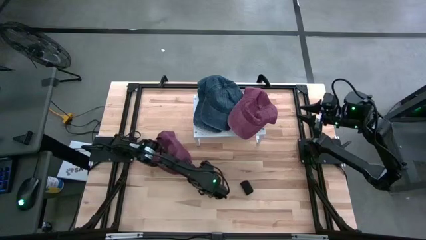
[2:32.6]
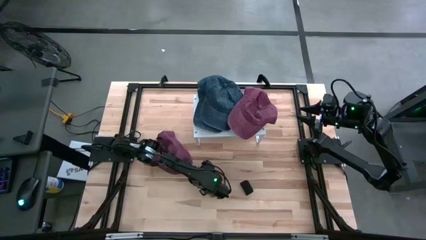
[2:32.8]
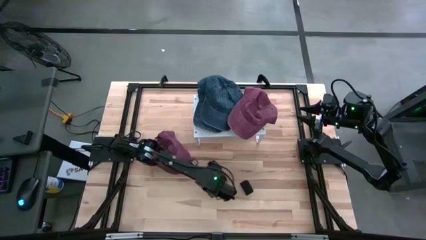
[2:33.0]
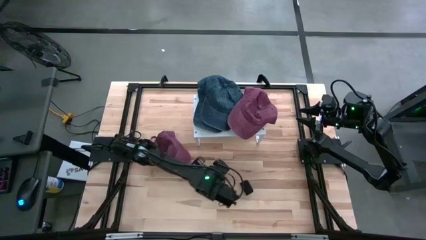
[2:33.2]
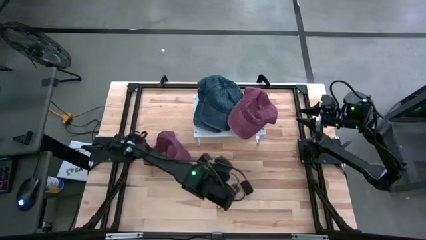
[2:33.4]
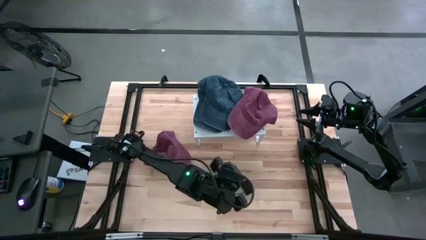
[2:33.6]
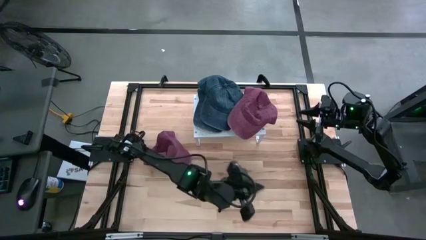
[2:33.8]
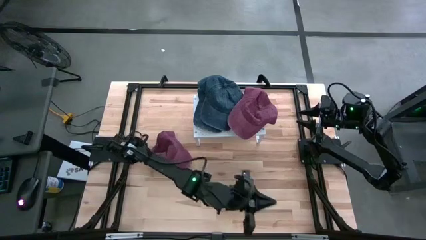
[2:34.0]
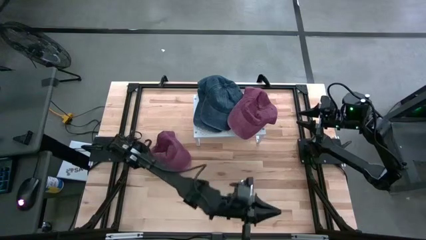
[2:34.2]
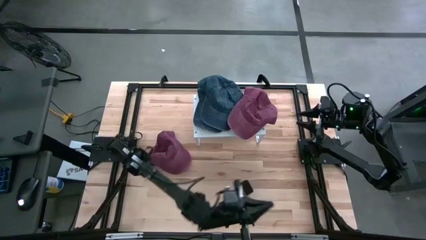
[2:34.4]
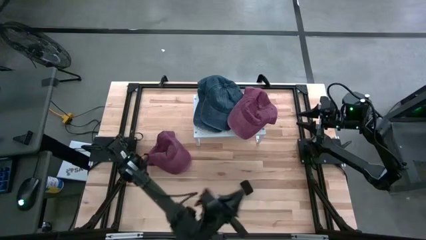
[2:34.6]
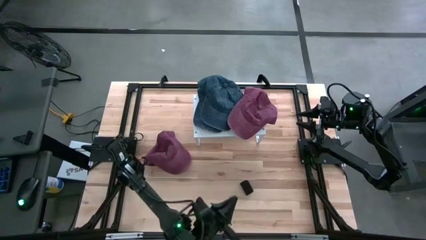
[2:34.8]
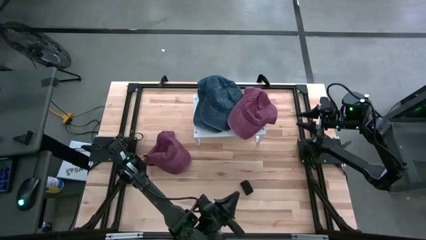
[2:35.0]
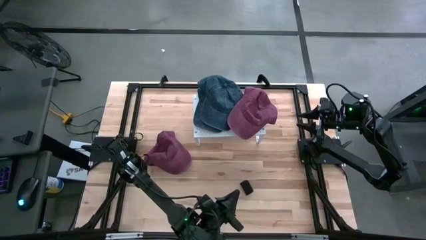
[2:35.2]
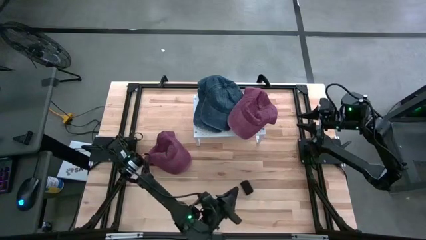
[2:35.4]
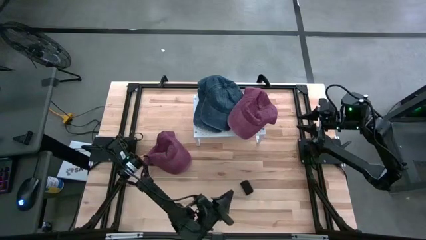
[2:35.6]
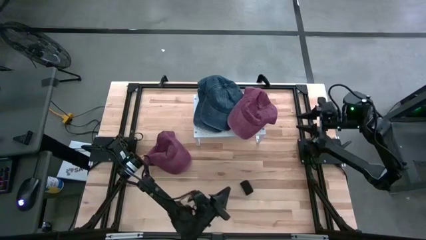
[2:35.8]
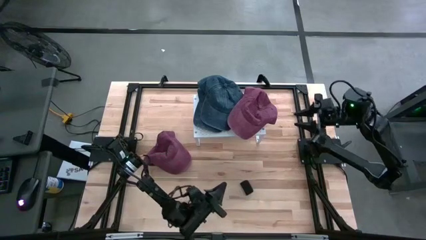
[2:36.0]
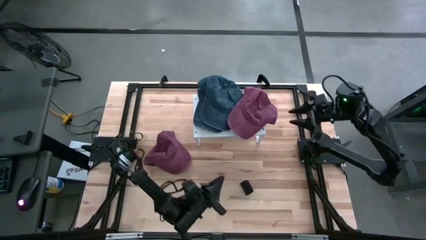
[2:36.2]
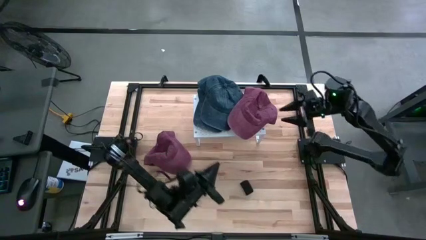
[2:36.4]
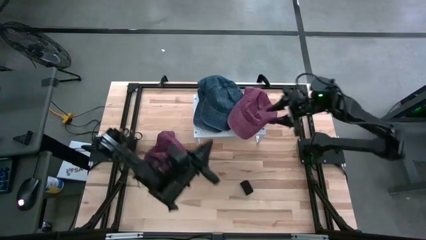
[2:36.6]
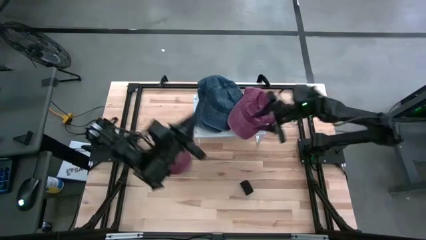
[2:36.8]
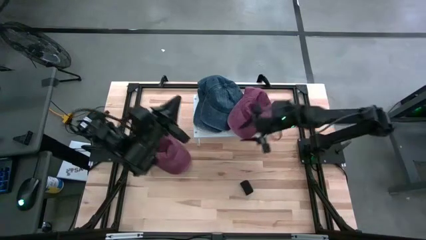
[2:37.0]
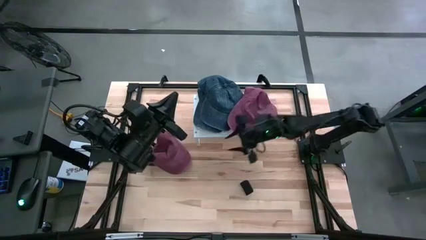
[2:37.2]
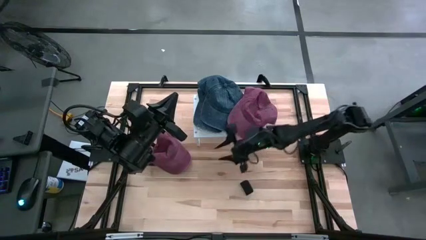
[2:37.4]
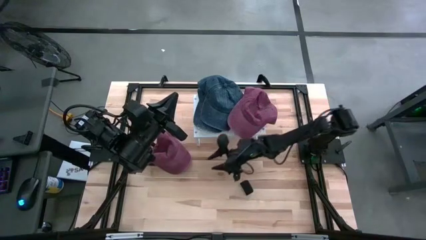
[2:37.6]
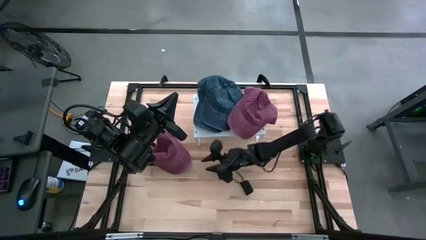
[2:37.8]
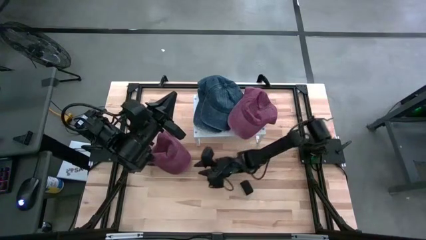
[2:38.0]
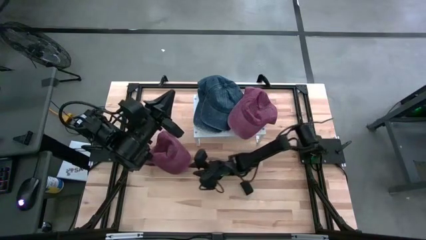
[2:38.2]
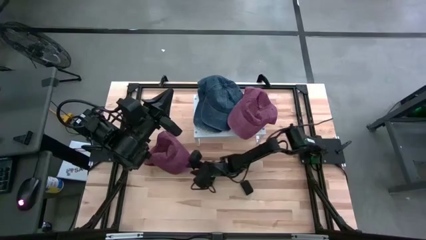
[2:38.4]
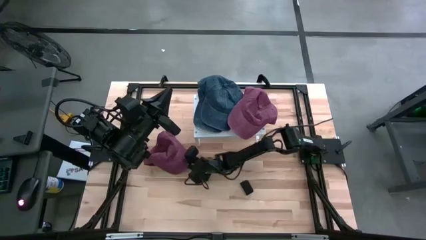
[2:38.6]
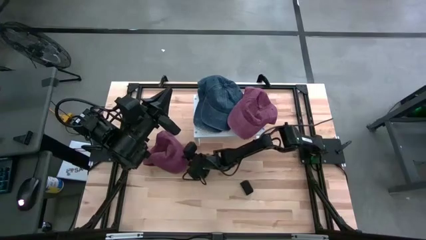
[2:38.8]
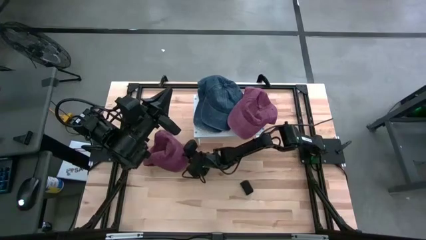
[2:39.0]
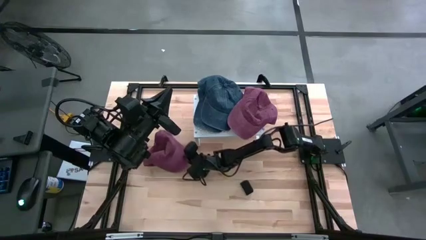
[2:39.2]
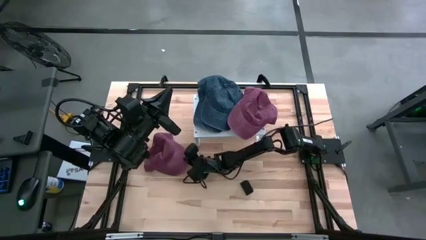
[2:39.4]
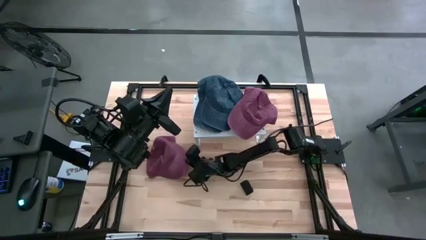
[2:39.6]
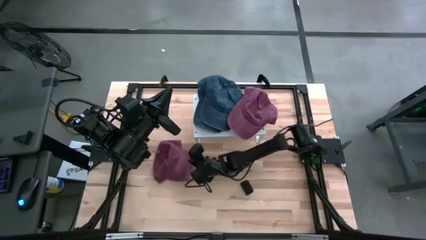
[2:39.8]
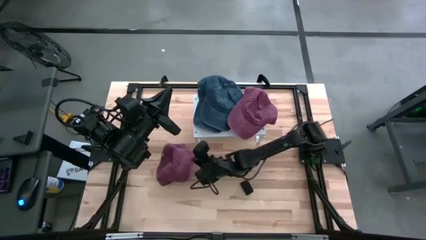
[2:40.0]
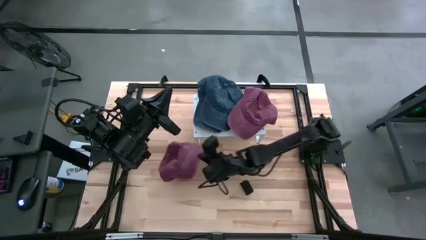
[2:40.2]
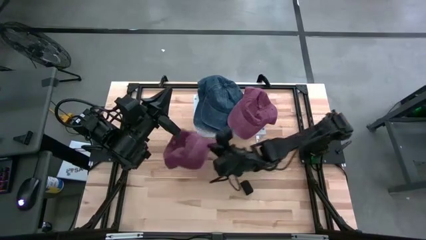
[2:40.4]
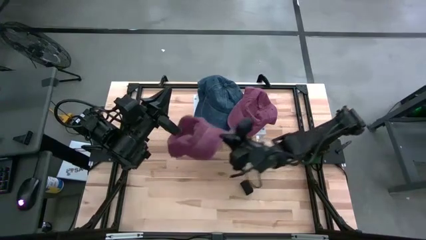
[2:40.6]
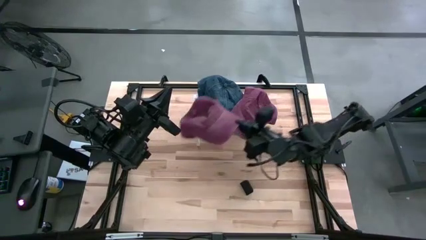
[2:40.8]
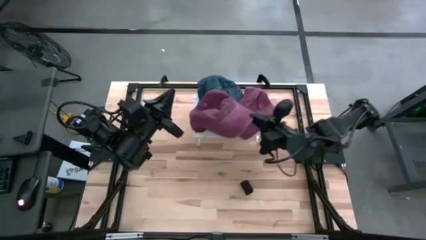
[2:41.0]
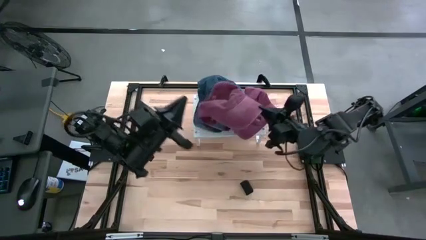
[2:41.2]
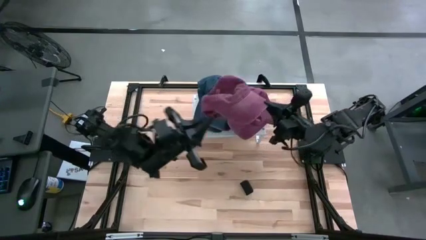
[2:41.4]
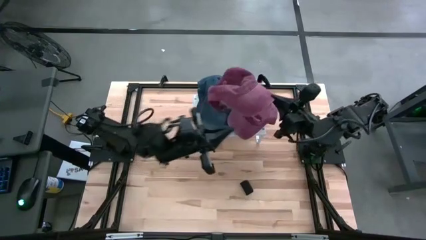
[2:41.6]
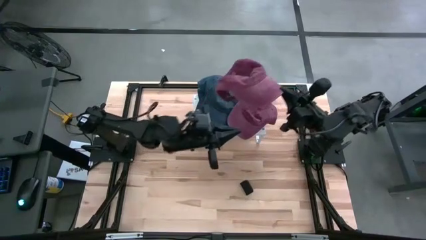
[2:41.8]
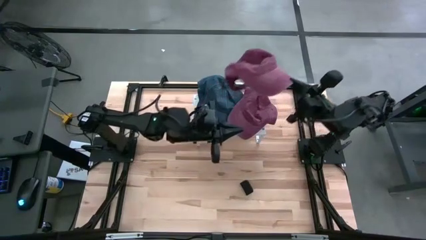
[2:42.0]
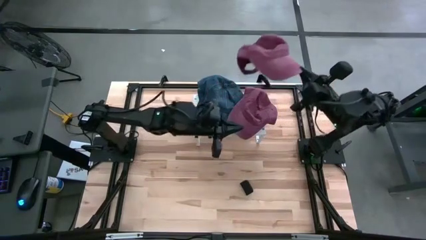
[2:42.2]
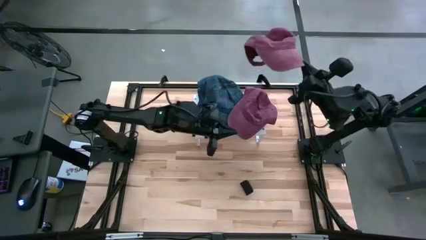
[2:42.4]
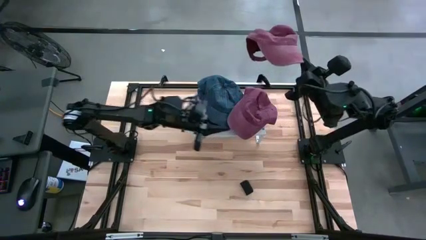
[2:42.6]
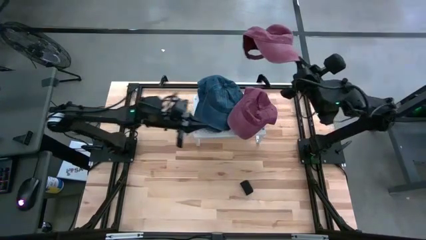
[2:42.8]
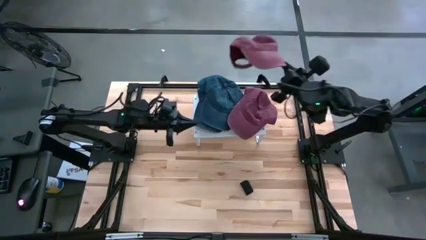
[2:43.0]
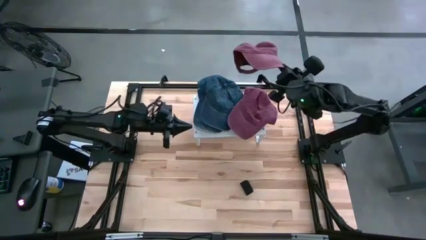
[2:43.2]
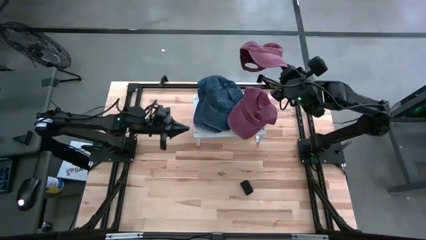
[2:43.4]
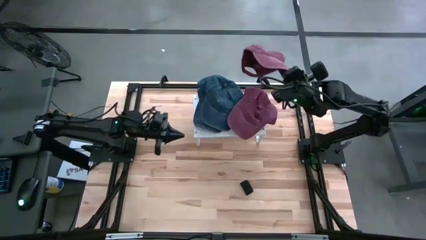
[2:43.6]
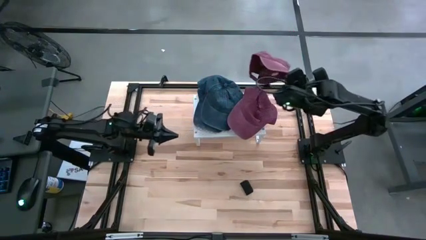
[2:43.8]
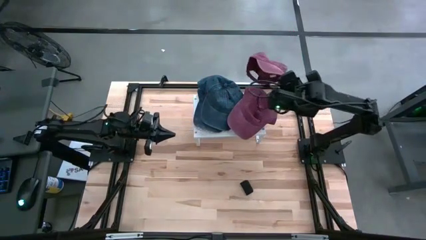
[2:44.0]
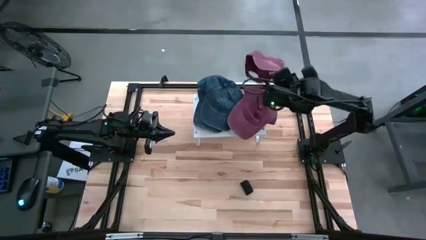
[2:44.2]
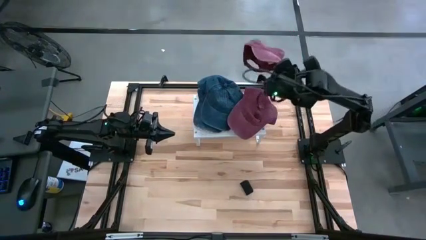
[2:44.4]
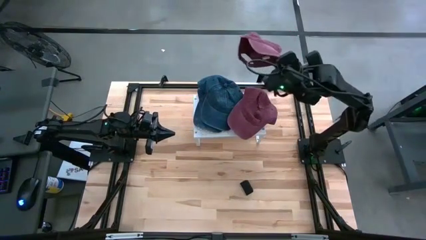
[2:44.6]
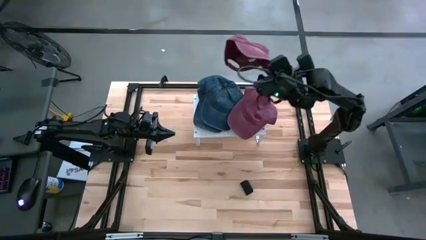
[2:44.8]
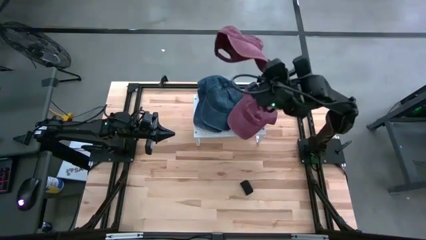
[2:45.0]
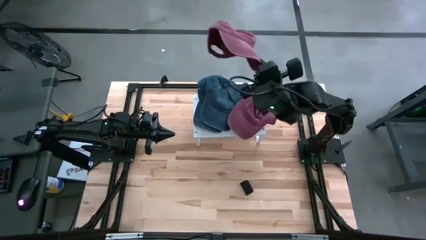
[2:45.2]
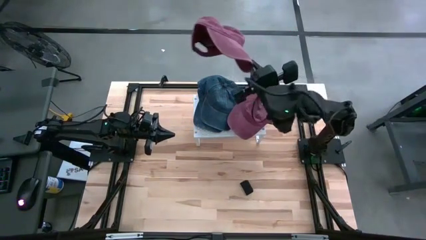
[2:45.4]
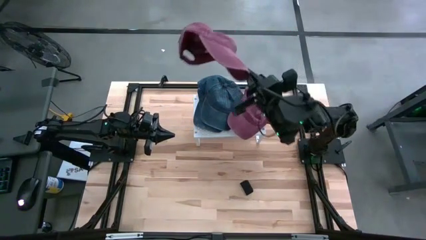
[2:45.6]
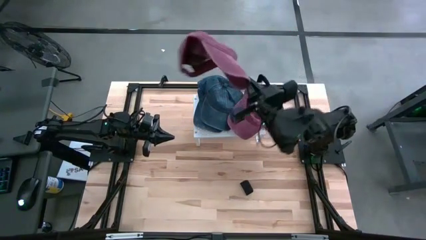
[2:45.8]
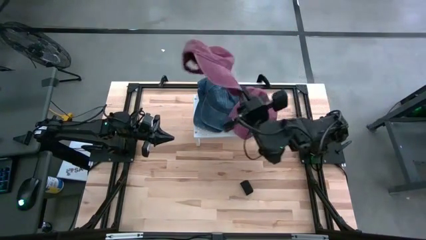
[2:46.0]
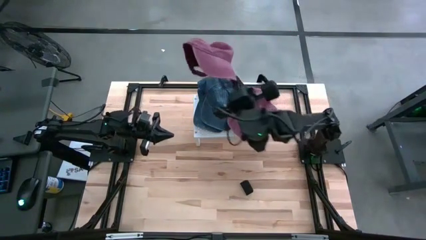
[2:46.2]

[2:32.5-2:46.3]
Task: Pick & Place hat
Stack the red cap on top of the other red cap on the shelf
